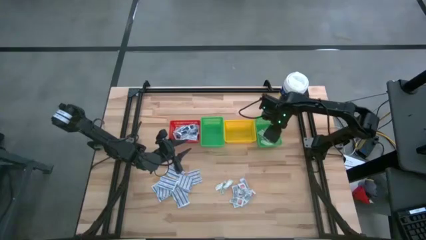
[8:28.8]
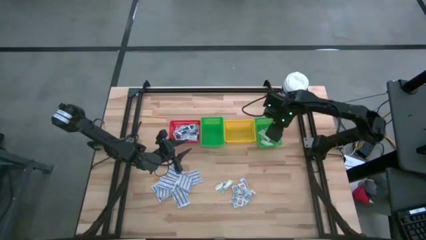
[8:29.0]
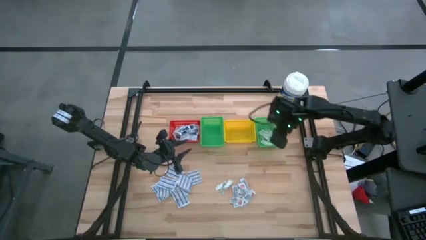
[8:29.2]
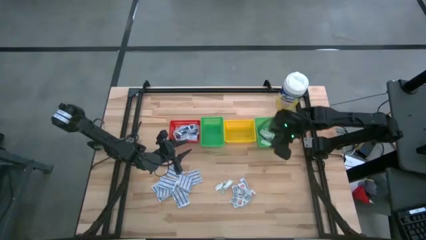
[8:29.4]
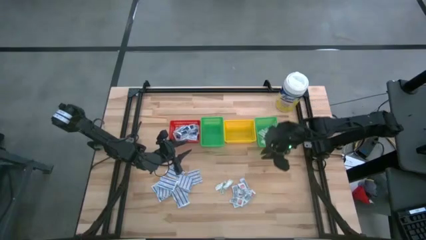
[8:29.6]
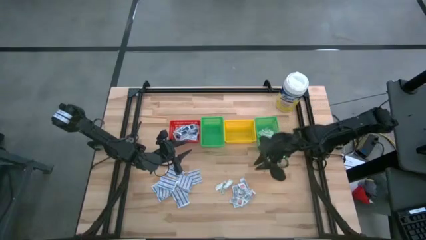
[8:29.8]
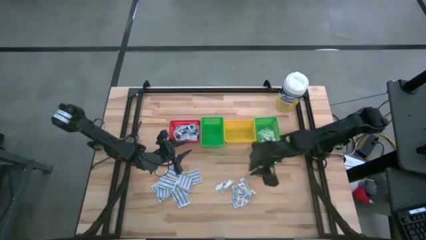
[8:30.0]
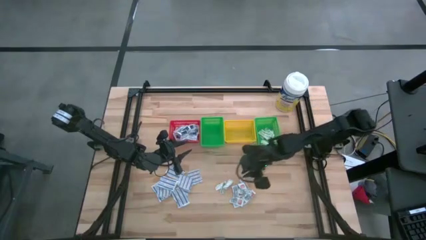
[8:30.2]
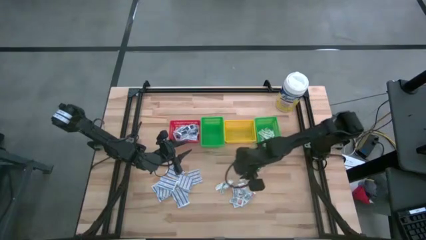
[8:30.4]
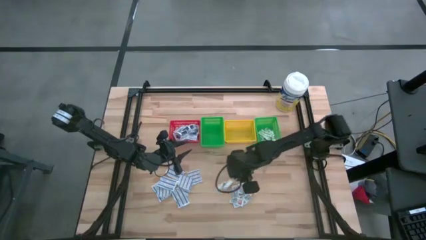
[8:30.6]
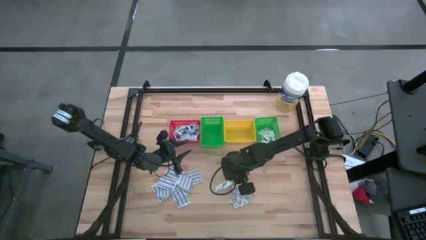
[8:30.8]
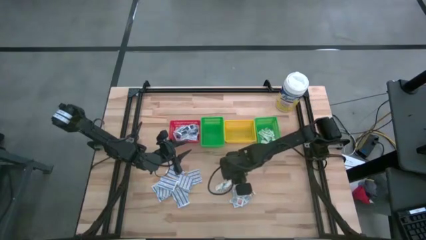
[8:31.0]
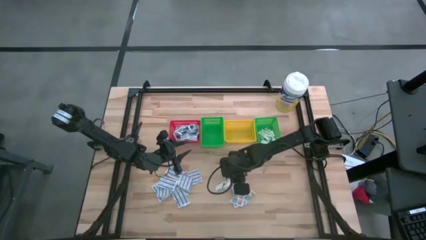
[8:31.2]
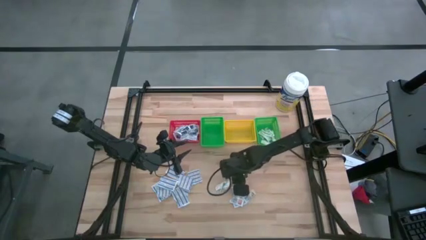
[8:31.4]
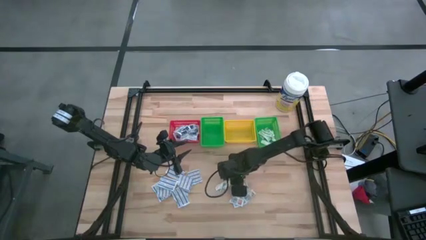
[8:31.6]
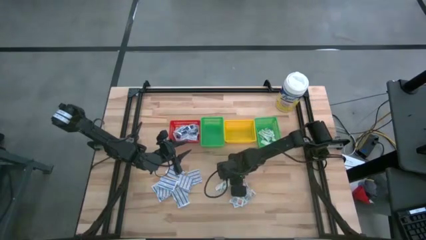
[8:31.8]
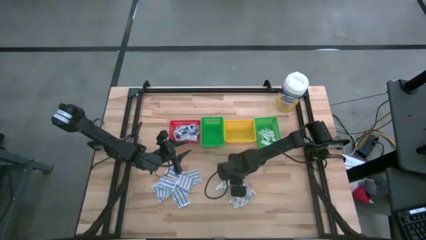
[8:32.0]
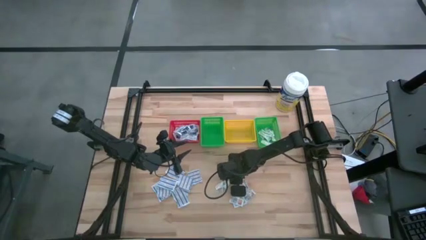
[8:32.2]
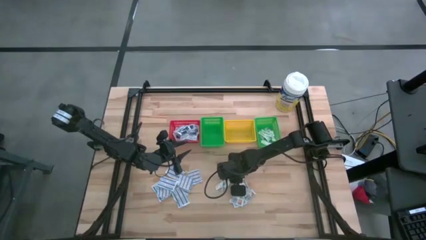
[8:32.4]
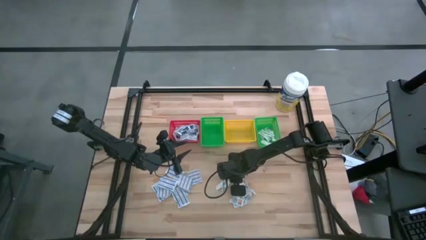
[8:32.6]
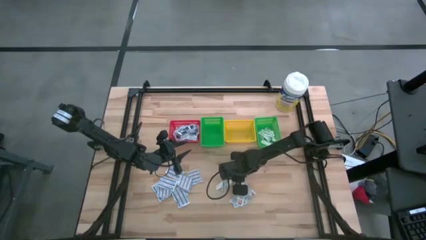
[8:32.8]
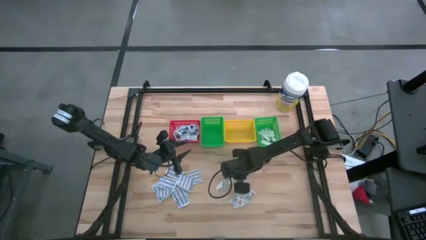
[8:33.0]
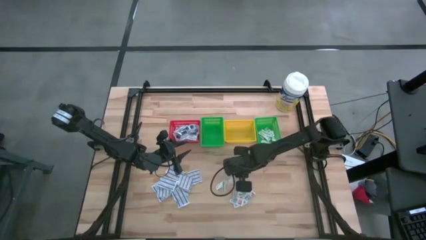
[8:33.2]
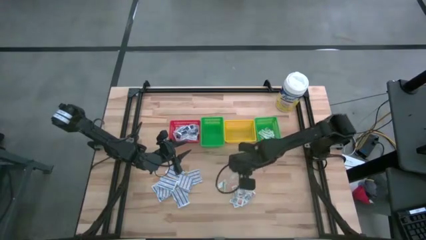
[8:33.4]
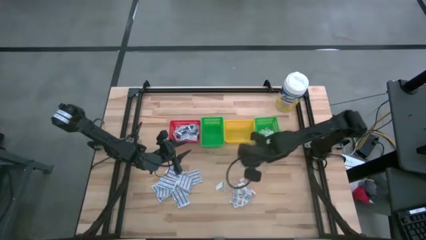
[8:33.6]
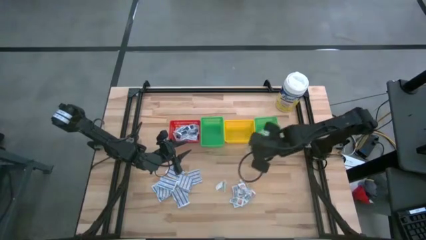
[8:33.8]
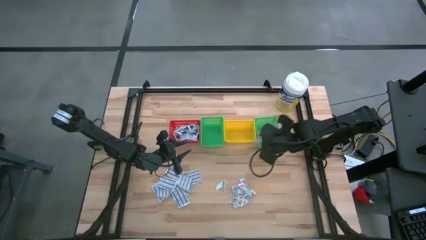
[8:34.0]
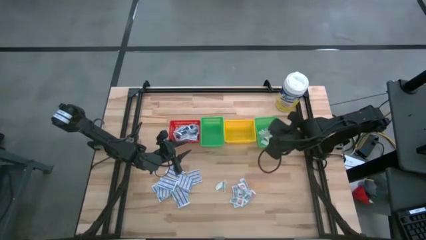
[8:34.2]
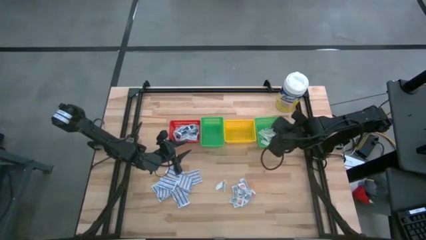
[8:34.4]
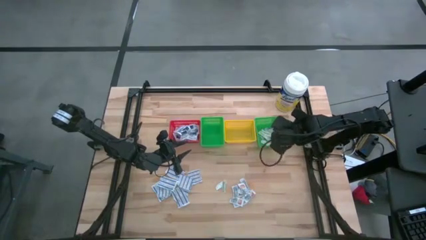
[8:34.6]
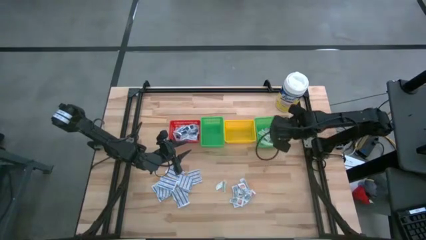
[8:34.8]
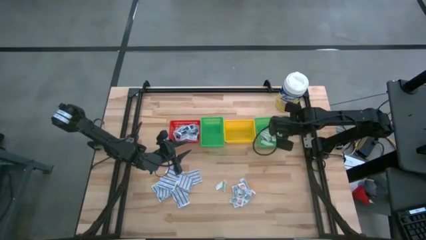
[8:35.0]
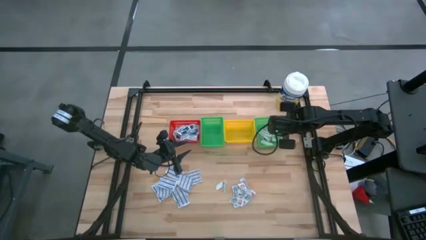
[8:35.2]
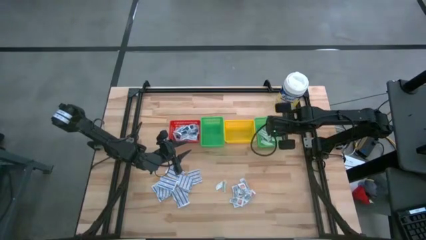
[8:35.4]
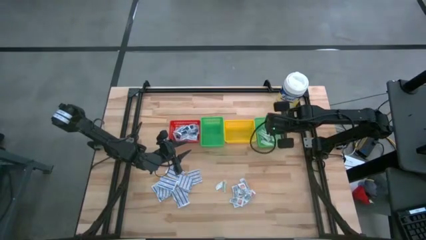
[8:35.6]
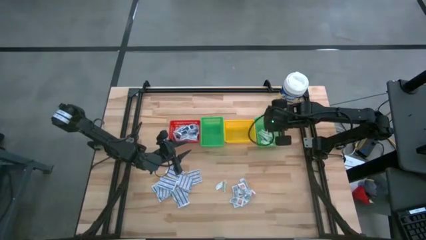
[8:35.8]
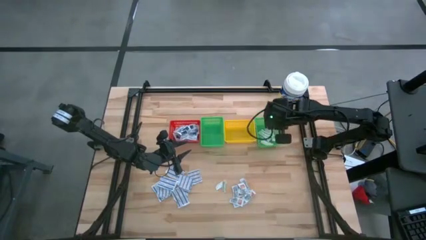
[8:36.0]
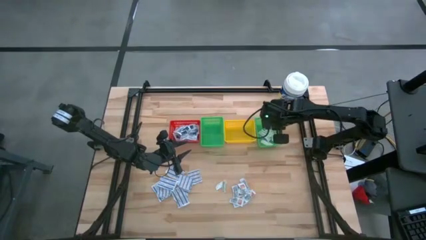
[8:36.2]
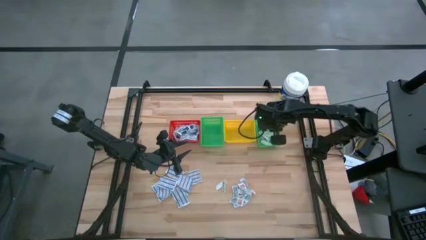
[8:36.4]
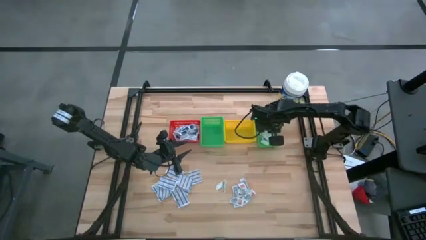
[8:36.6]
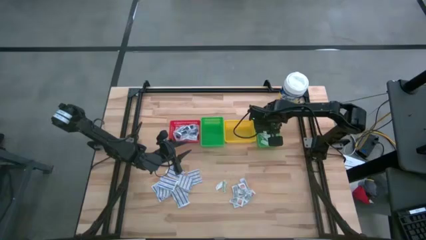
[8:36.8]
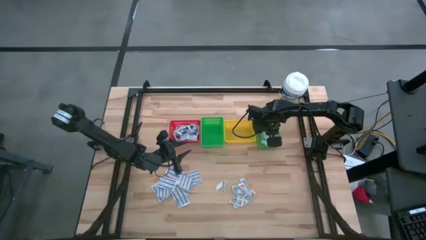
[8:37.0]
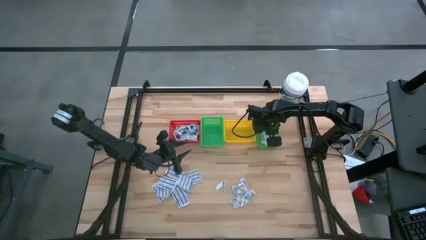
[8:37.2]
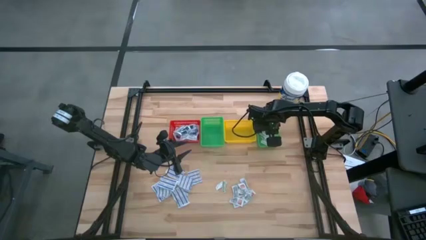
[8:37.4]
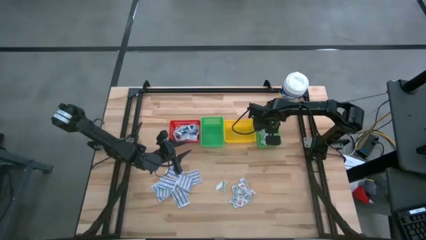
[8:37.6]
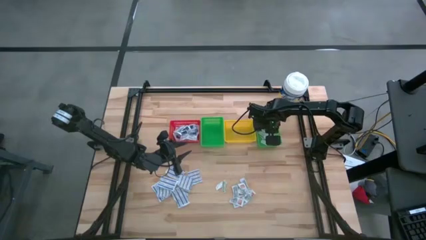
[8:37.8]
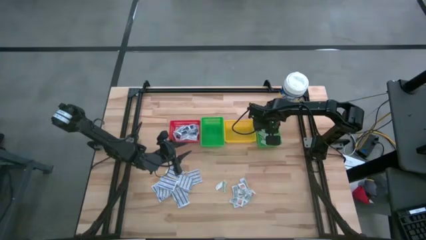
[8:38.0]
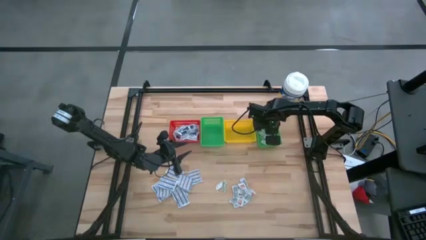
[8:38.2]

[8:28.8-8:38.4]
Task: Pick & Place First Aid Supplies
Put the green bandage into the right green basket

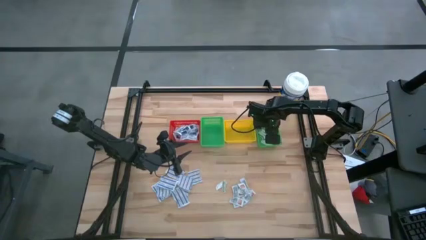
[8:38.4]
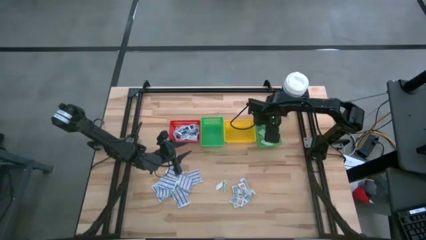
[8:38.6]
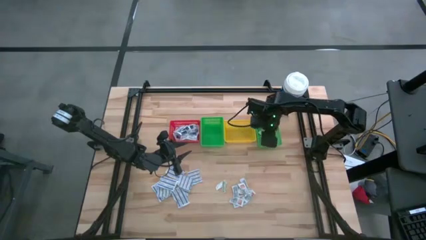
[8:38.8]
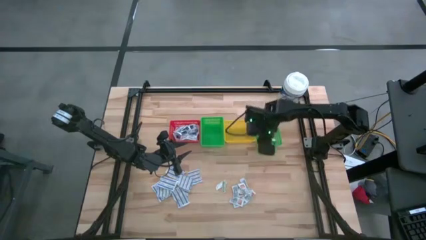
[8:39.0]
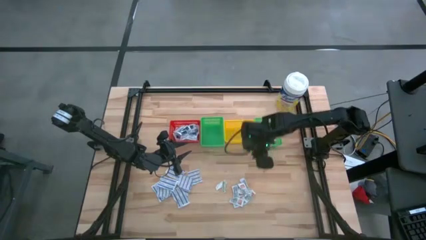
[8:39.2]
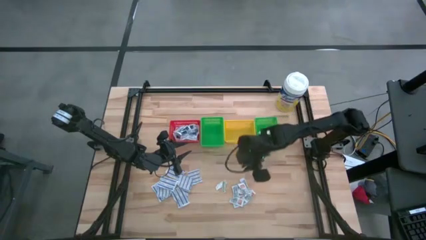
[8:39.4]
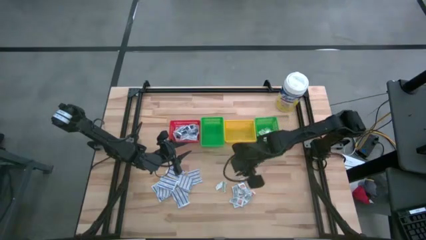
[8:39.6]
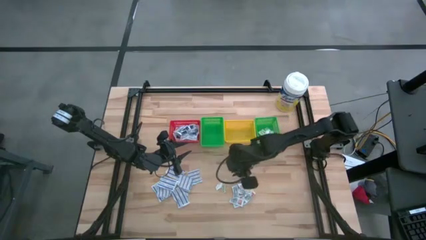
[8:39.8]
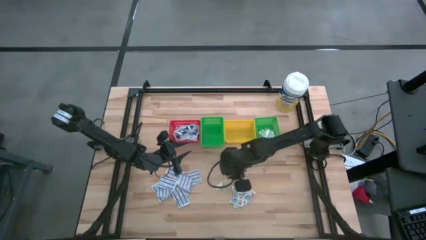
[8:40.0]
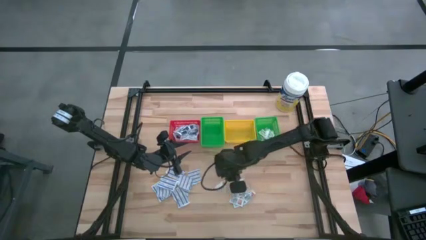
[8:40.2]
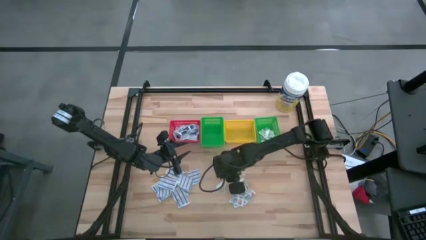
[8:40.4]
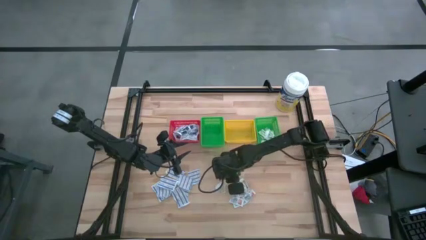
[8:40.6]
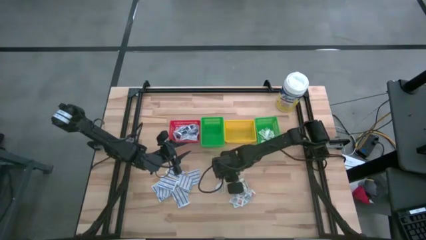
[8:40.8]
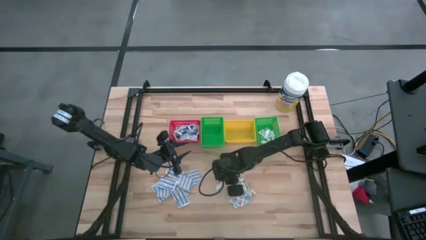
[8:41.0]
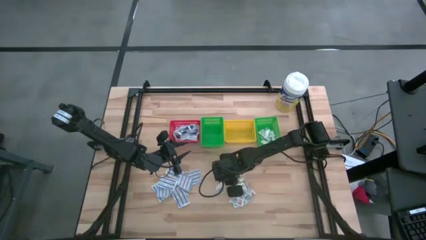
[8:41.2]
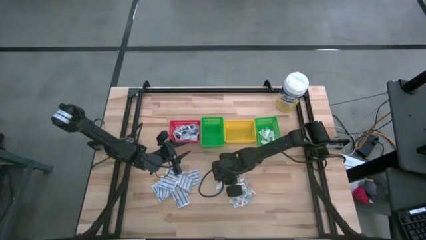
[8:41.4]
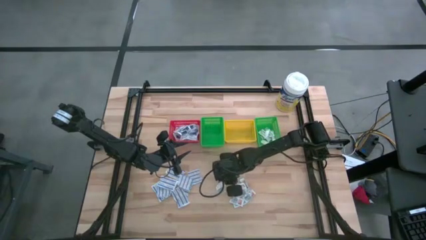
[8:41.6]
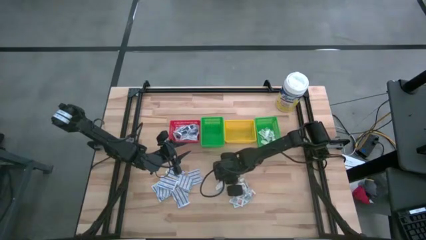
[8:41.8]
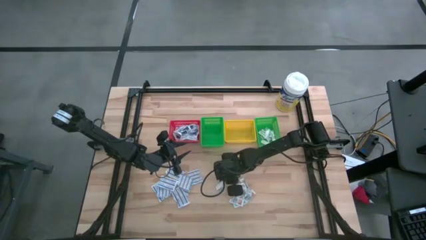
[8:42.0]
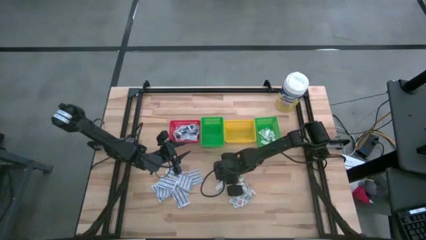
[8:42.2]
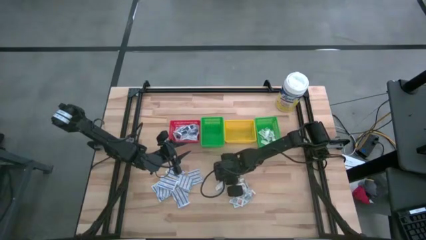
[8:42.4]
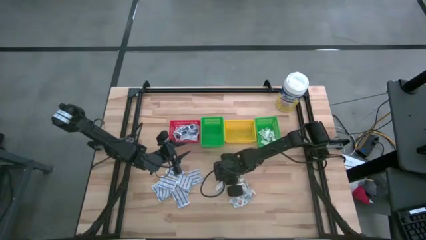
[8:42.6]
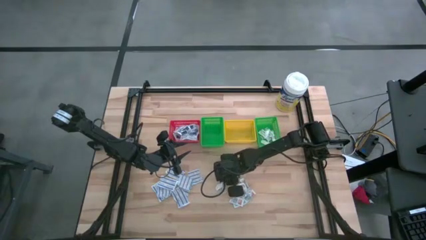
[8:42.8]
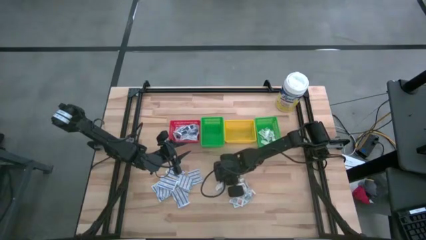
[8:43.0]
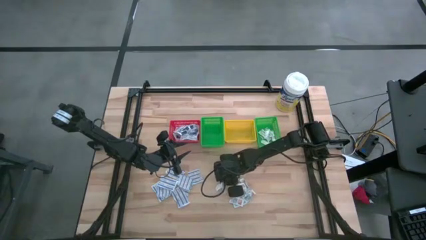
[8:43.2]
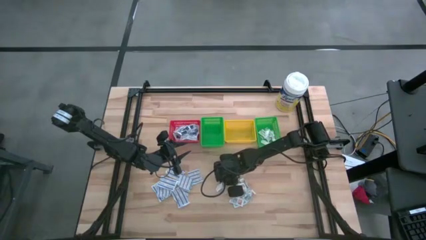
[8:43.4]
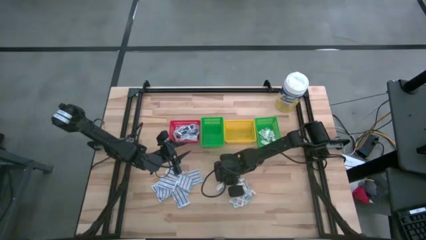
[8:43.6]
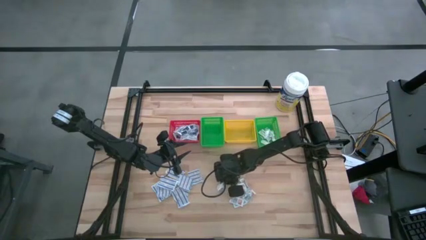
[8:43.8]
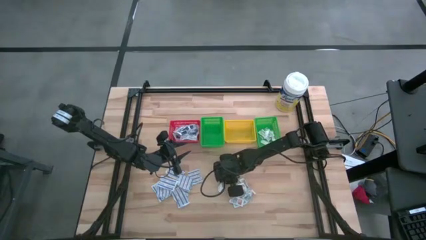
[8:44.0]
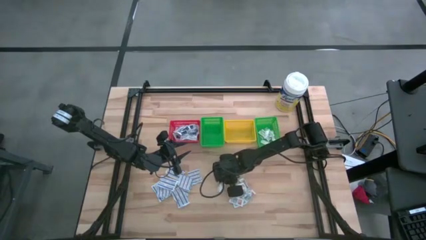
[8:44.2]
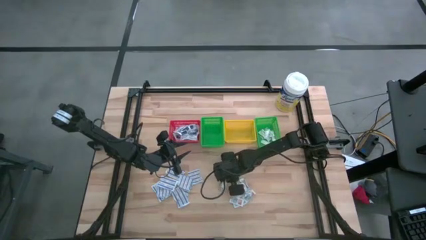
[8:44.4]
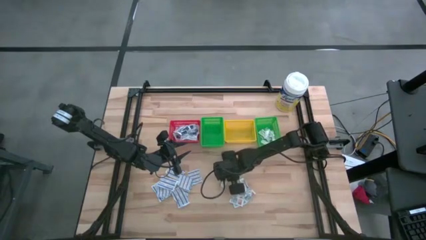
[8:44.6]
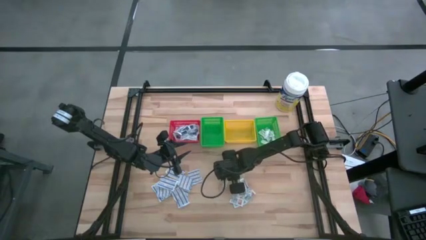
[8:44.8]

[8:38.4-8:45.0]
Put the green bandage into the right green basket
